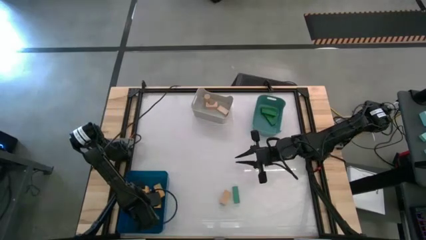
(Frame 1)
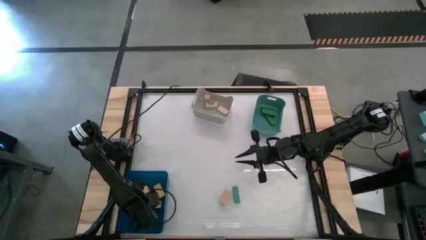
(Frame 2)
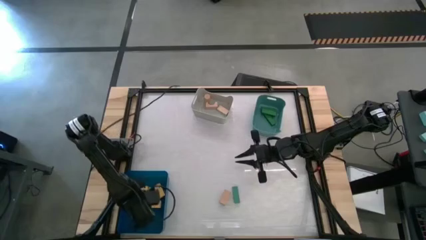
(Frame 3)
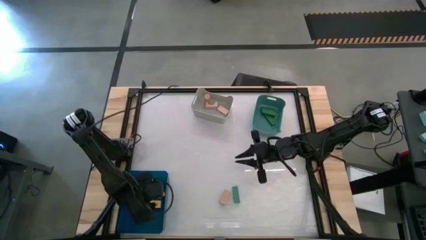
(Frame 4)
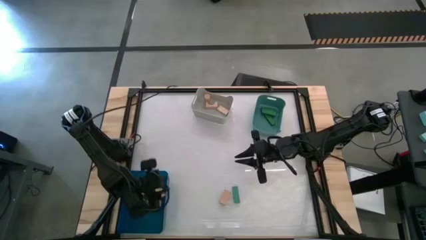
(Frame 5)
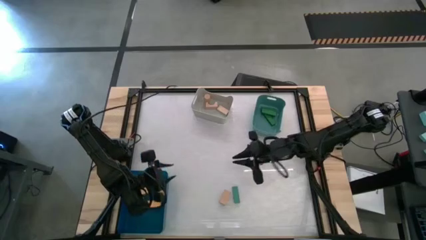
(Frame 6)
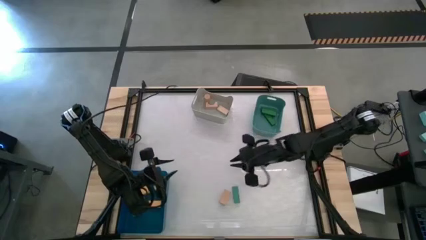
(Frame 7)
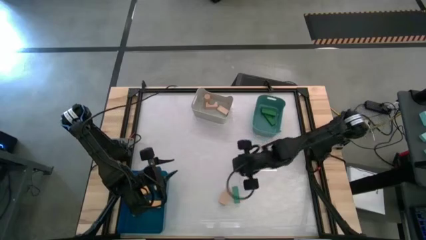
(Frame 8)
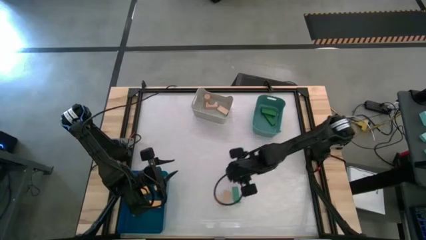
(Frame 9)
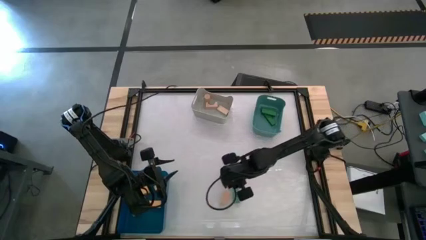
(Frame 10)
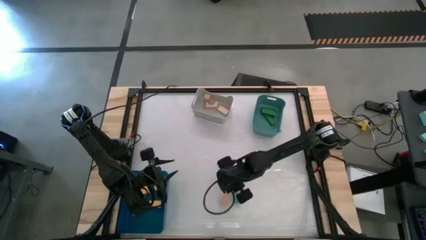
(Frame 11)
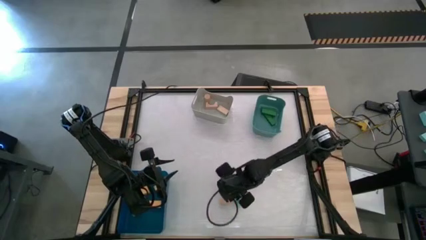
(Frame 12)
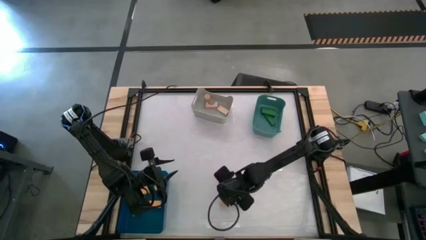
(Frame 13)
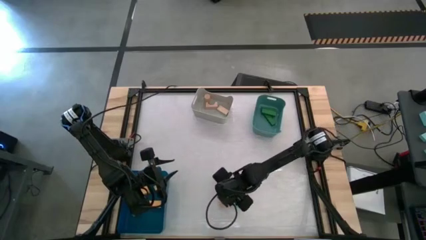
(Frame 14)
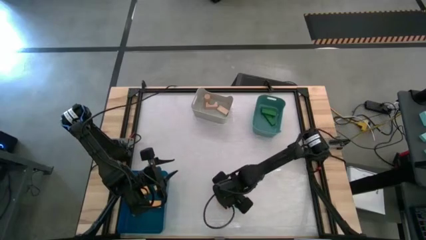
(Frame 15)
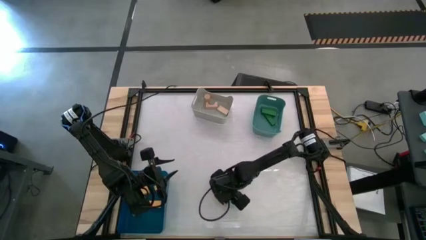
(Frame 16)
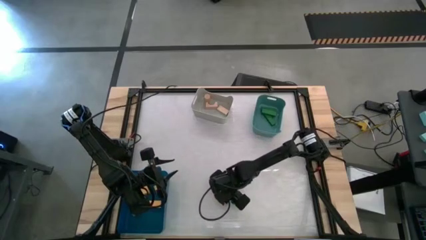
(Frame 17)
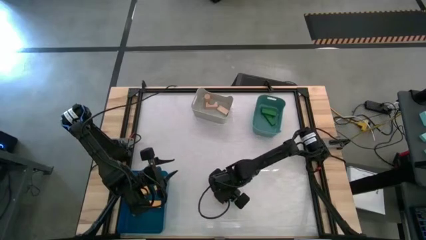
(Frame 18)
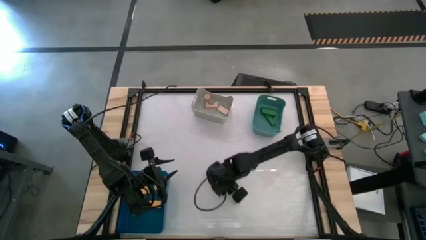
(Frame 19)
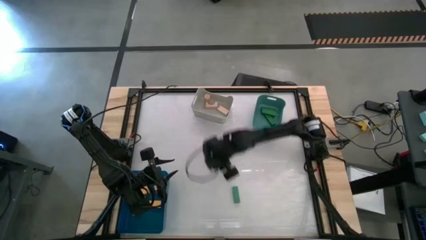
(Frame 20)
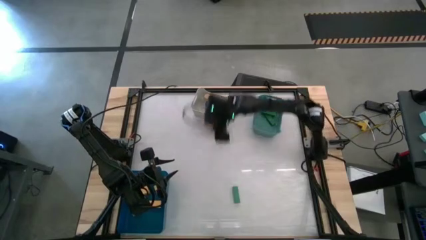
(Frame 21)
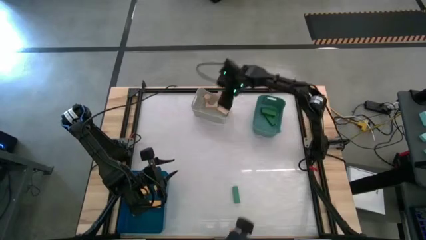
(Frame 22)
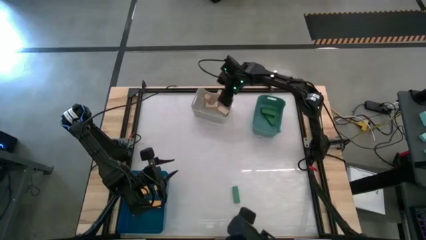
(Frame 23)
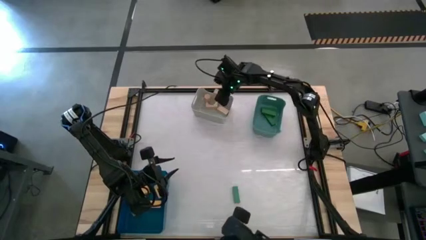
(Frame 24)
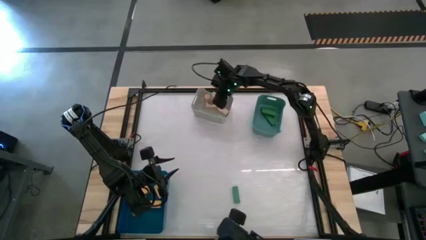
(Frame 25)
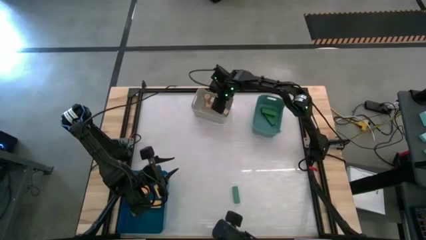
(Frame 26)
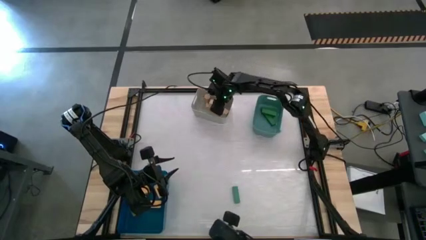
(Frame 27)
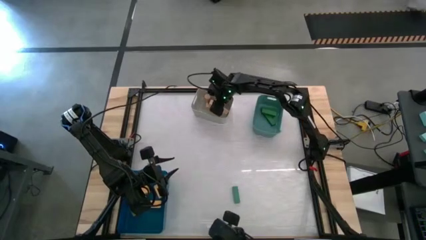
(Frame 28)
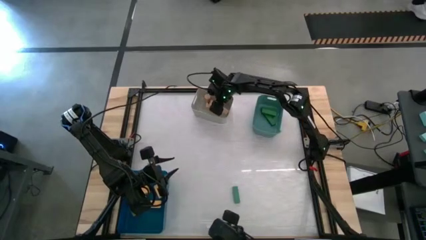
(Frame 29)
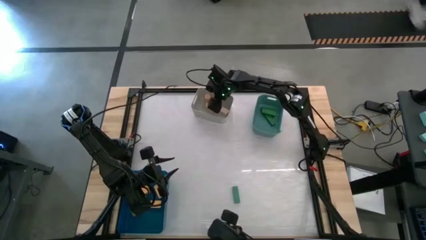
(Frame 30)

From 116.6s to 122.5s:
Task: Sort & place blocks by color
Put the brown block into the gray bin

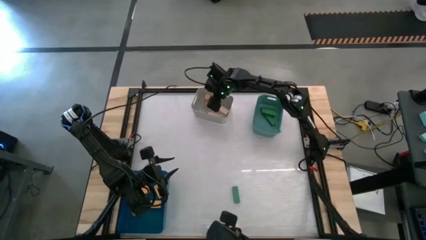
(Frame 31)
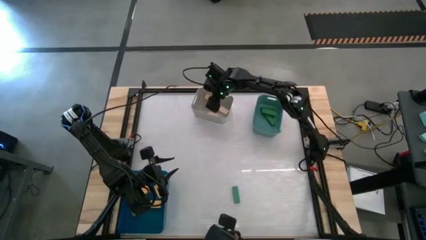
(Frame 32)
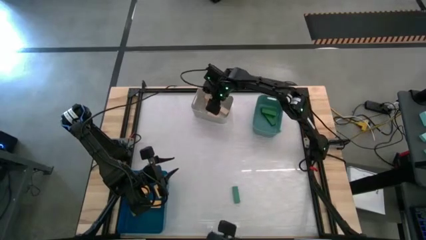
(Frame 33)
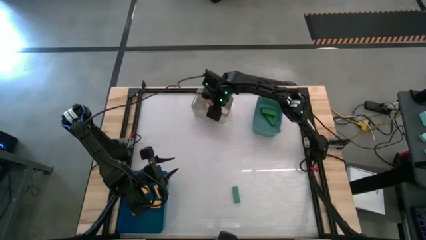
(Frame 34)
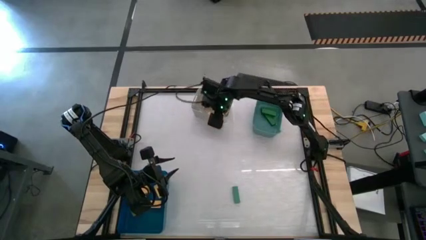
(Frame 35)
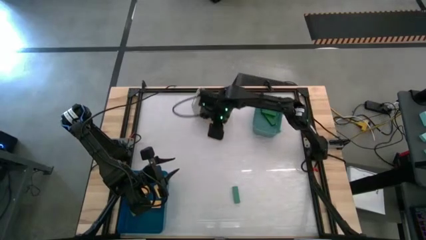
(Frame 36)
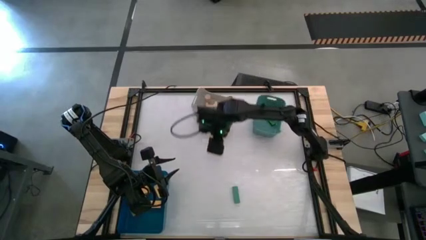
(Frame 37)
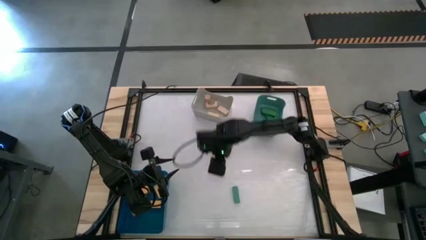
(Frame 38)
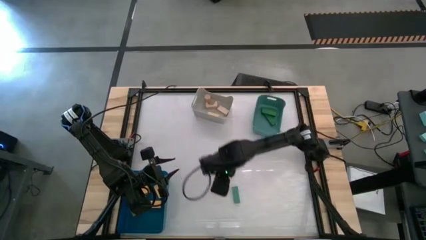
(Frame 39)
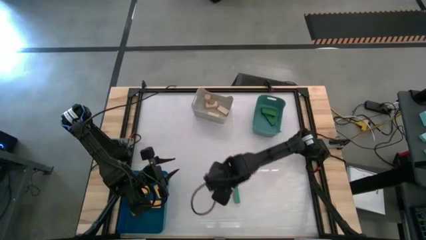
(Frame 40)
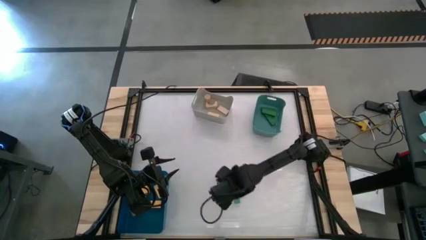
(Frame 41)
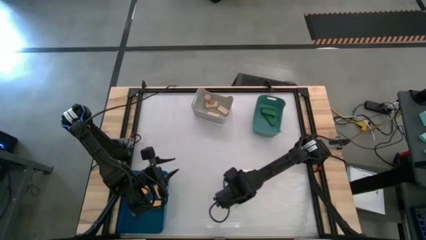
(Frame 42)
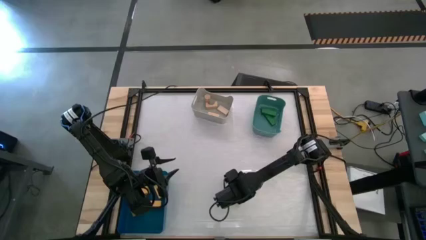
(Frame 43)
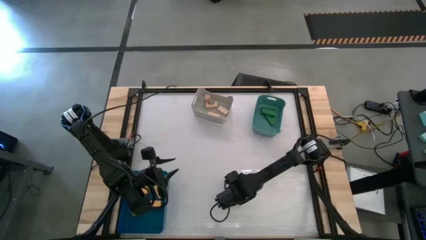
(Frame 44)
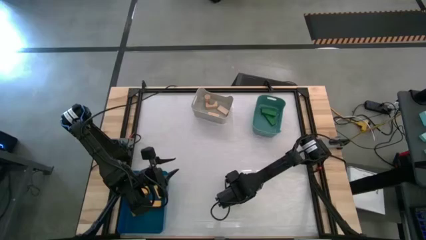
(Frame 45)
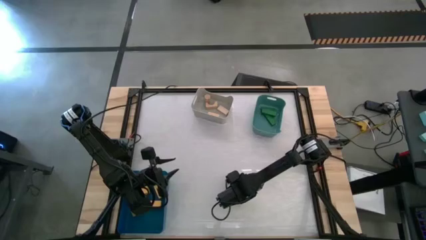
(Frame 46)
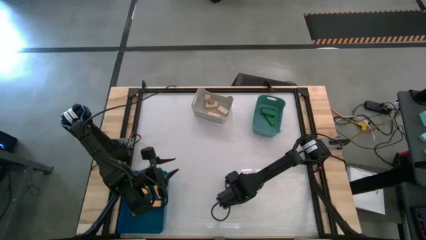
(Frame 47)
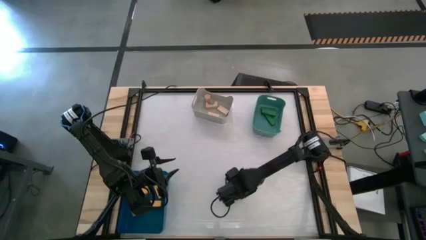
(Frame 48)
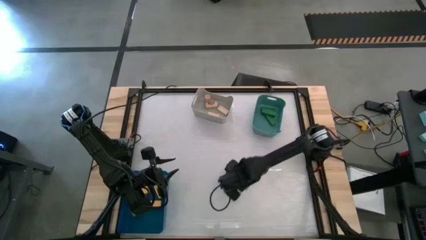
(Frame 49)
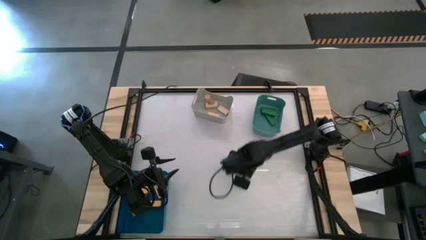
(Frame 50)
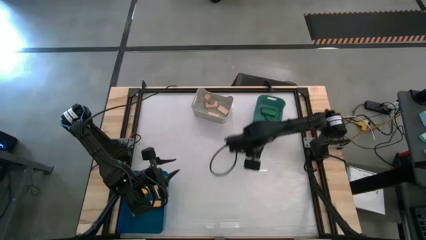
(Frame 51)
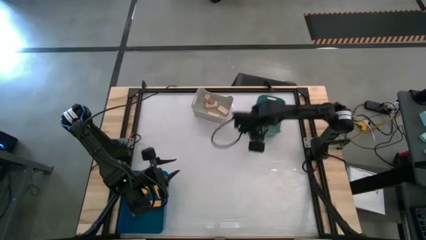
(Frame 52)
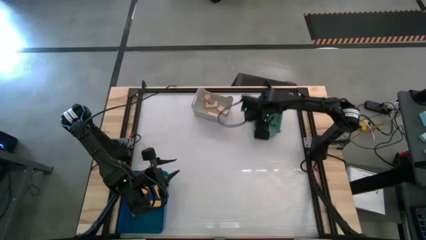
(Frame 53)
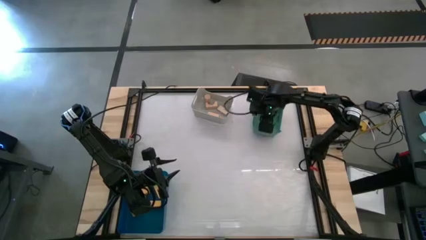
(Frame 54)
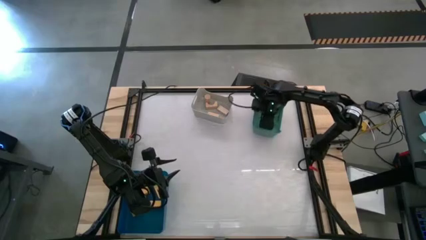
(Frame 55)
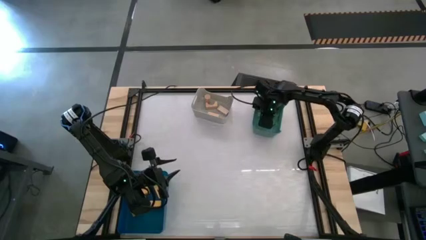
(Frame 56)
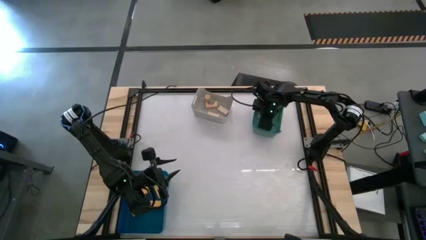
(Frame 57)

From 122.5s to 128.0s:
Put the green block into the green bin

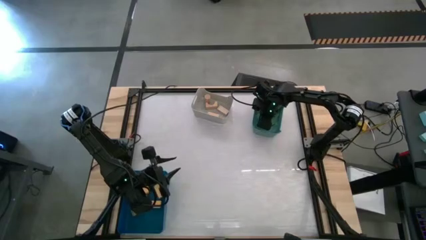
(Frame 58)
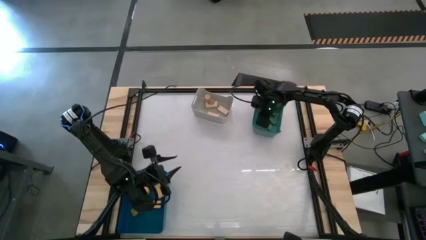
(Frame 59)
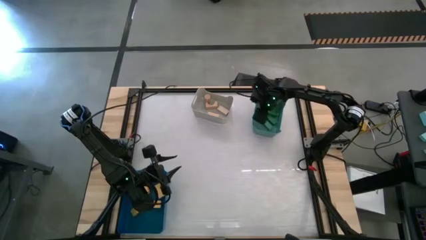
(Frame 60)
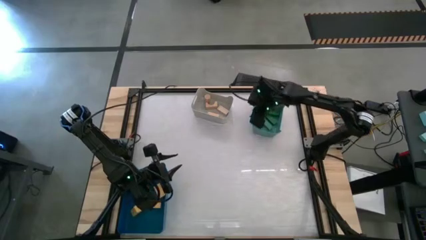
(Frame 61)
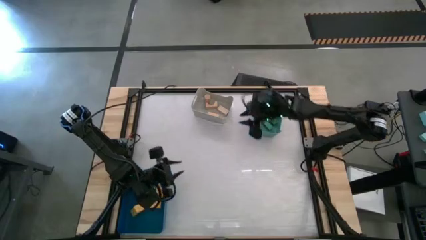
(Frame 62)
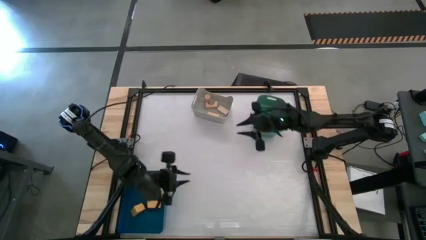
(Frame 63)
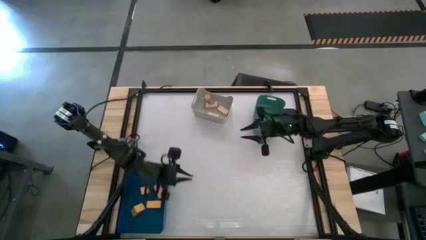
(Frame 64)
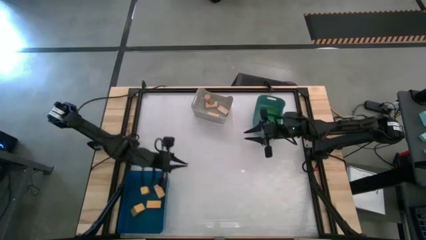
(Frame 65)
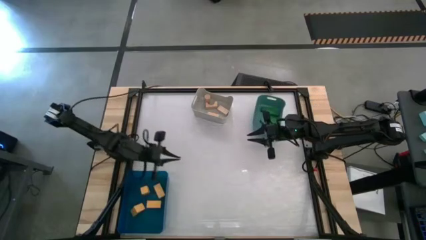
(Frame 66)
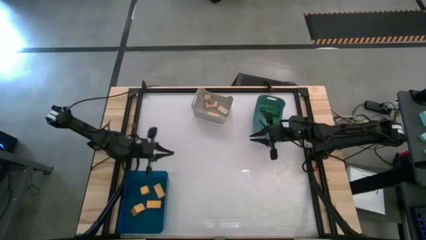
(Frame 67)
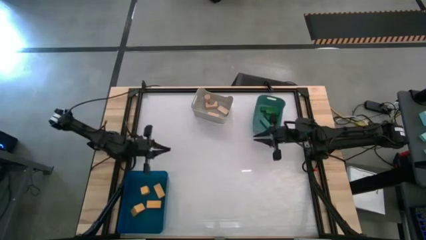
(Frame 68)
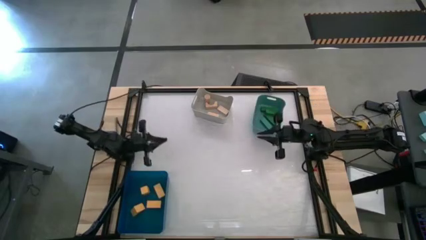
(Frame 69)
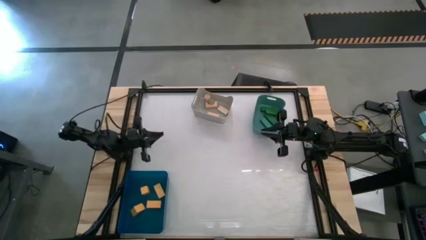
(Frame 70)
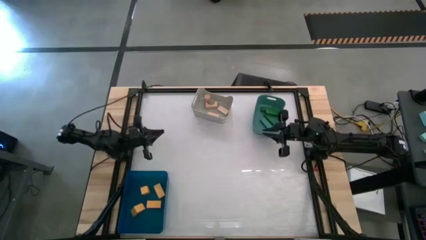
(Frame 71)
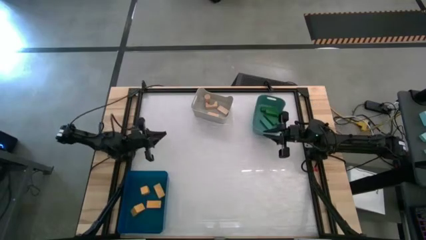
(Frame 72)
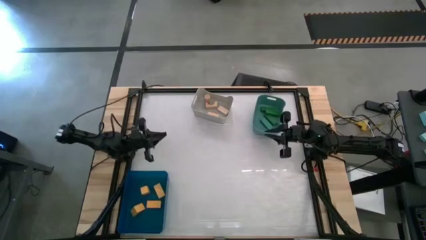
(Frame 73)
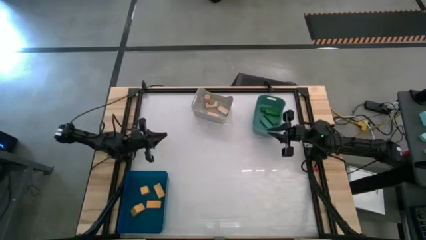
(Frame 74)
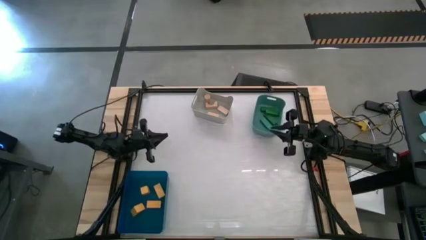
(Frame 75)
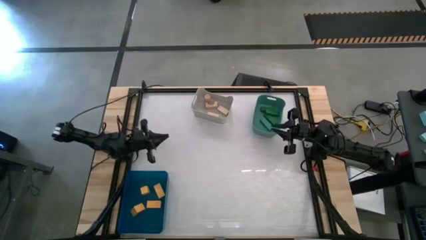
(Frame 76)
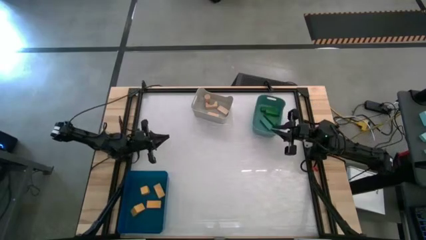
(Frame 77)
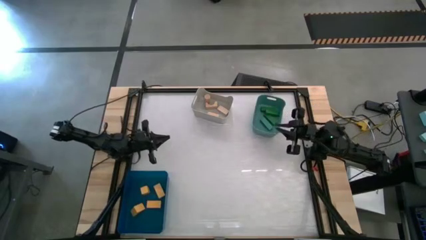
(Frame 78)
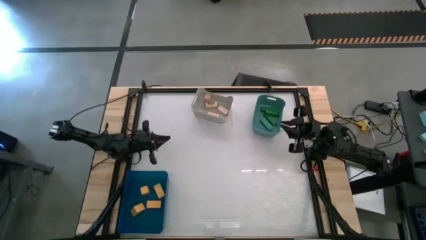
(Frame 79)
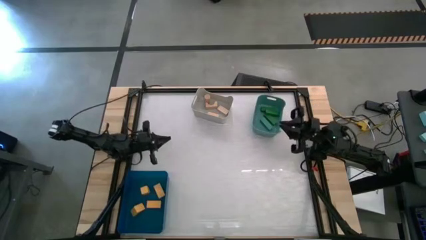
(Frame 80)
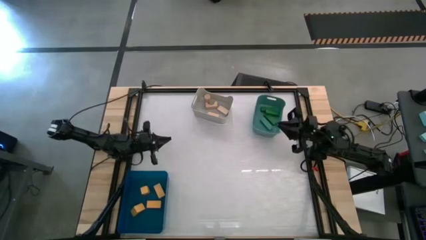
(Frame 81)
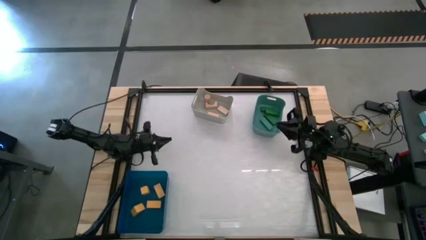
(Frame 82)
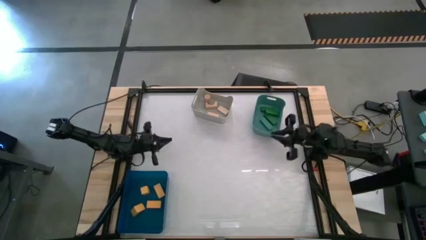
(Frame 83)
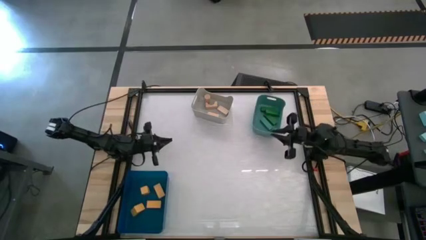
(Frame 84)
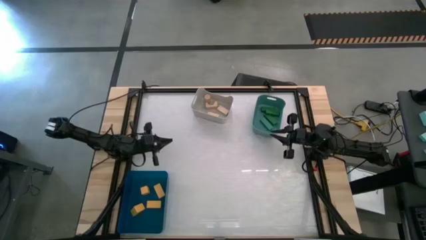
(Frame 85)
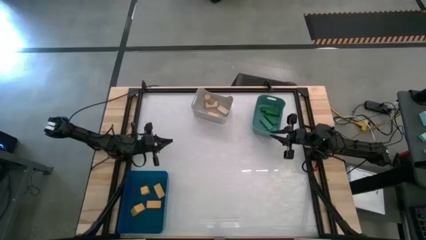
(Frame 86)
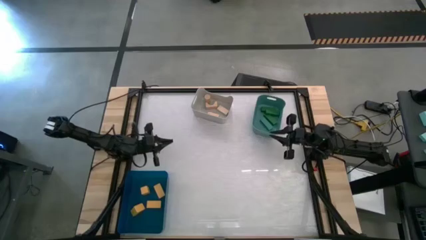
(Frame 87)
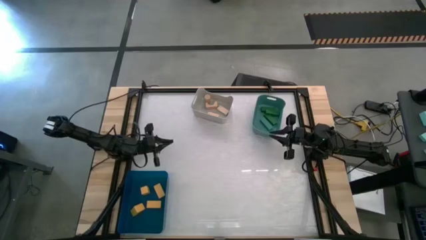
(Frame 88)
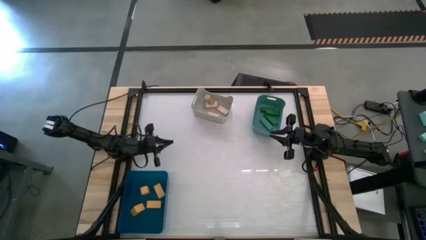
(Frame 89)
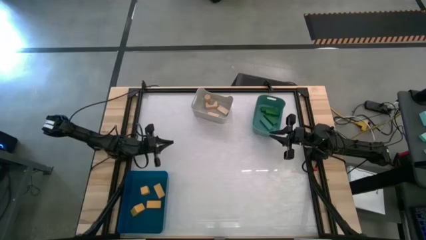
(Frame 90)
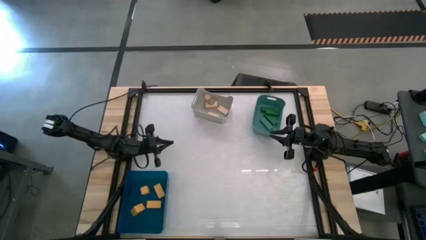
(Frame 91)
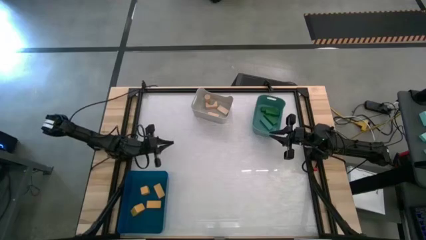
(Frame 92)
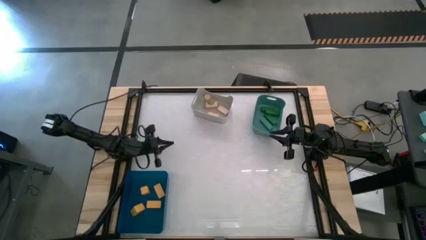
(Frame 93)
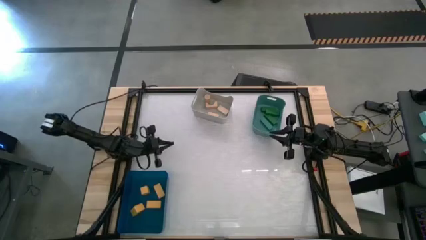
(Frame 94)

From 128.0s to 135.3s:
Return to Home Position
